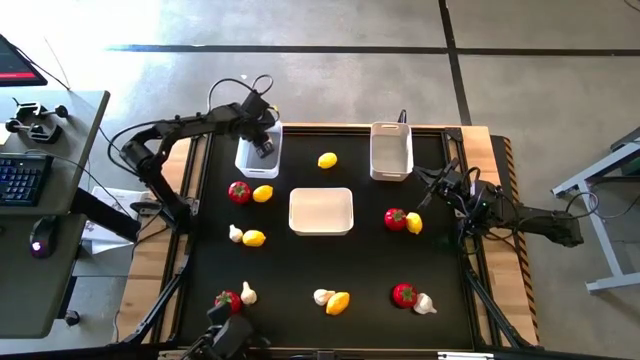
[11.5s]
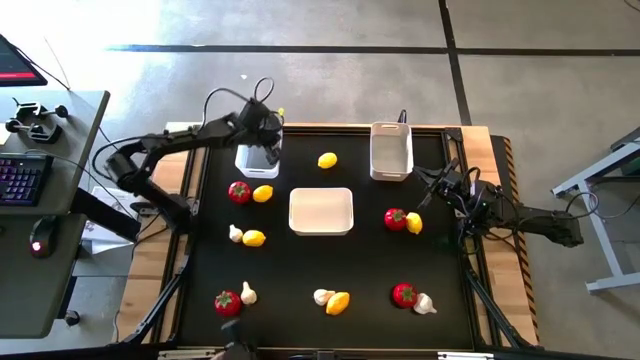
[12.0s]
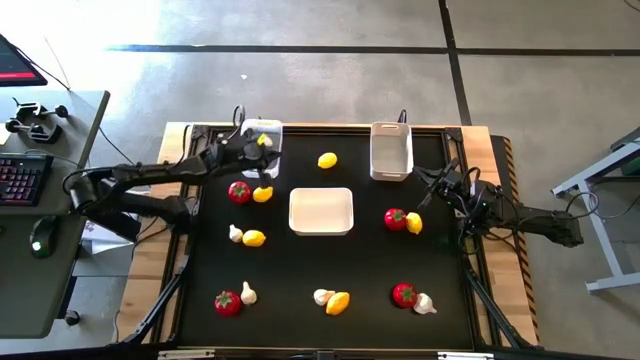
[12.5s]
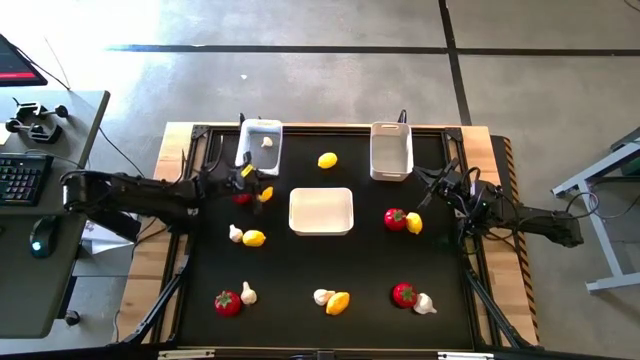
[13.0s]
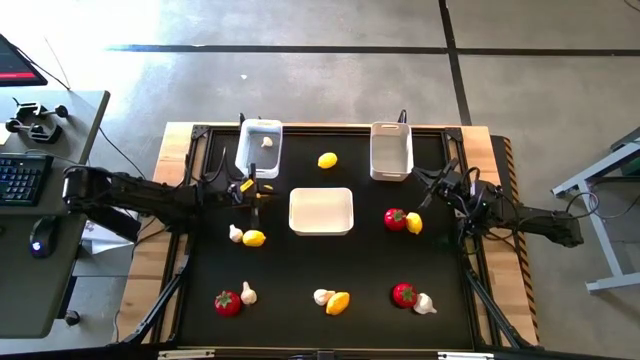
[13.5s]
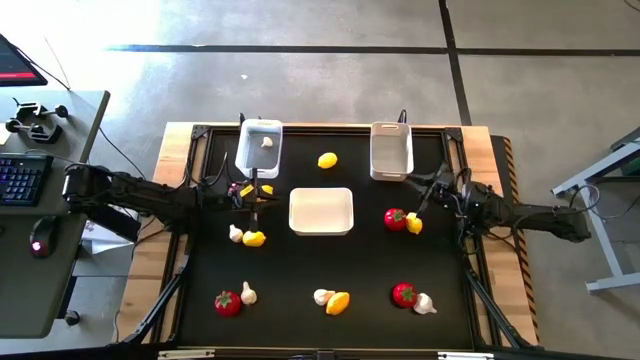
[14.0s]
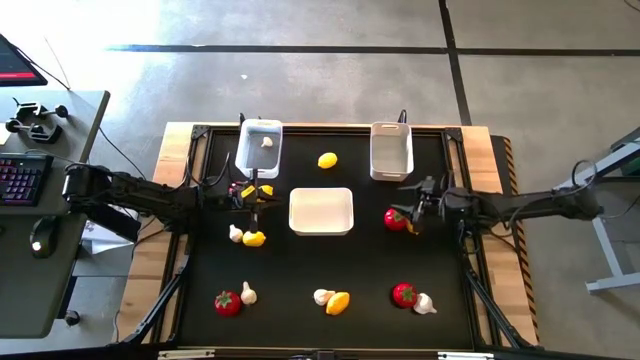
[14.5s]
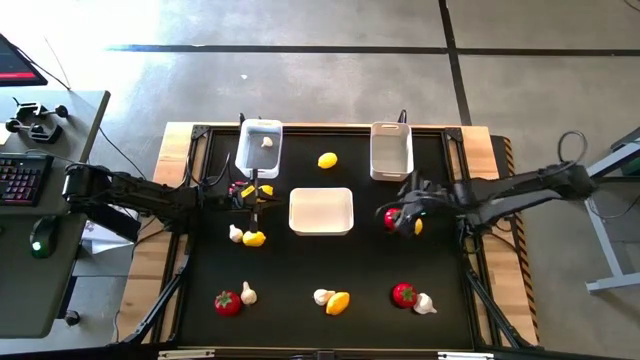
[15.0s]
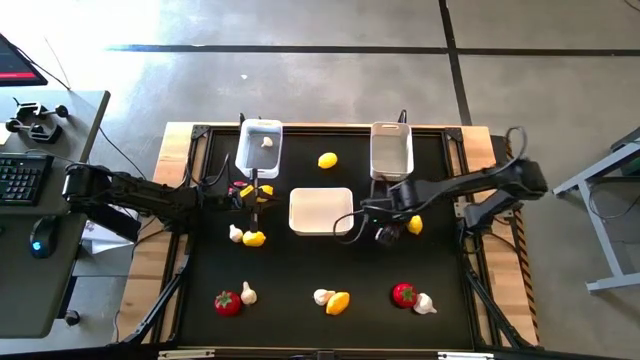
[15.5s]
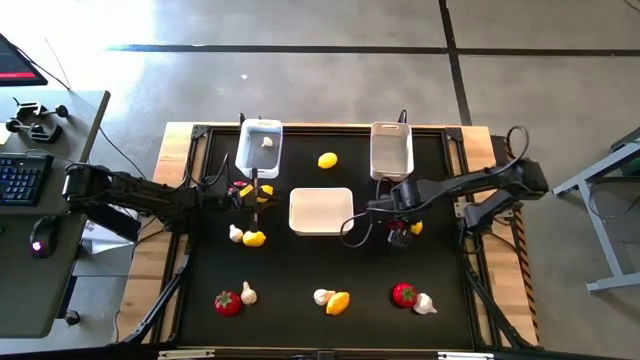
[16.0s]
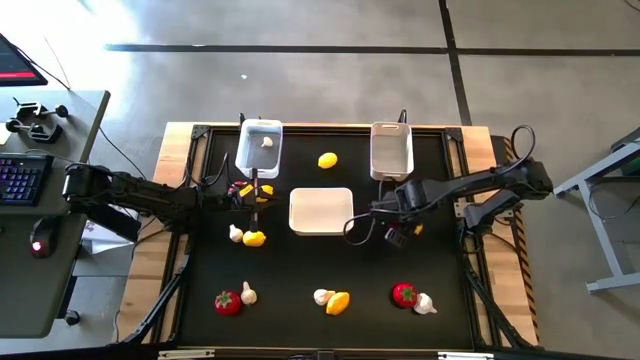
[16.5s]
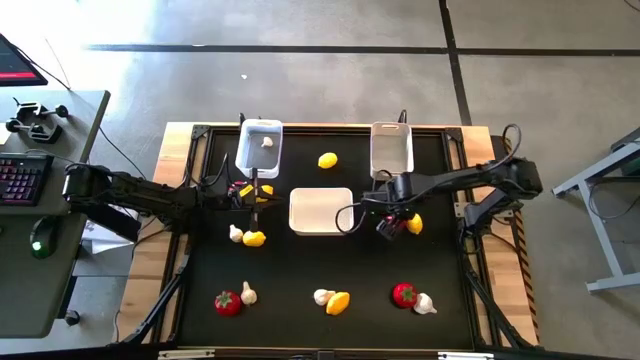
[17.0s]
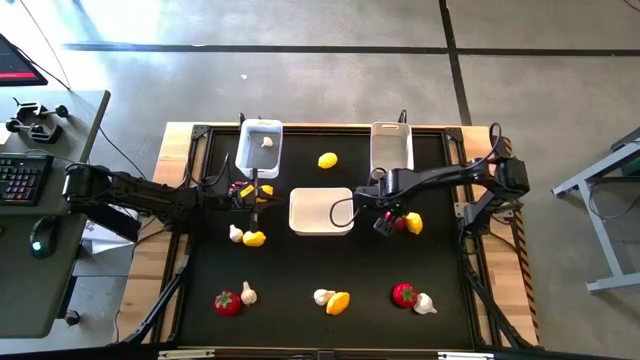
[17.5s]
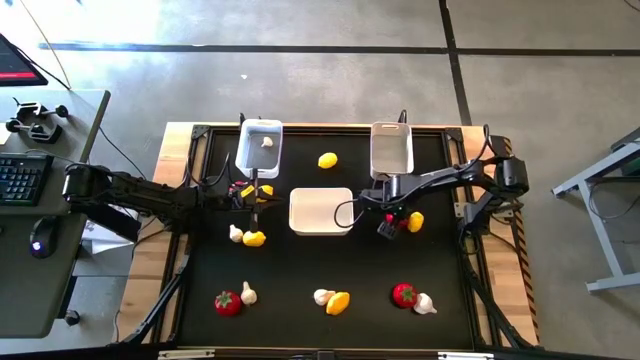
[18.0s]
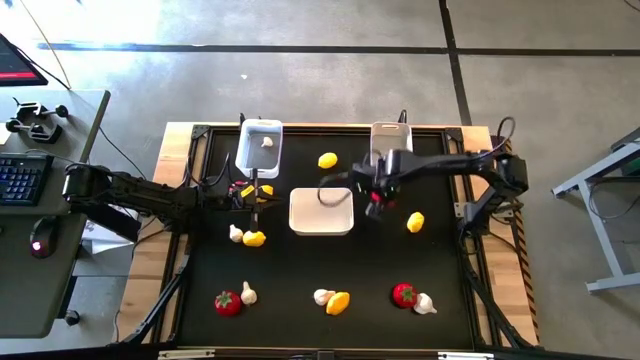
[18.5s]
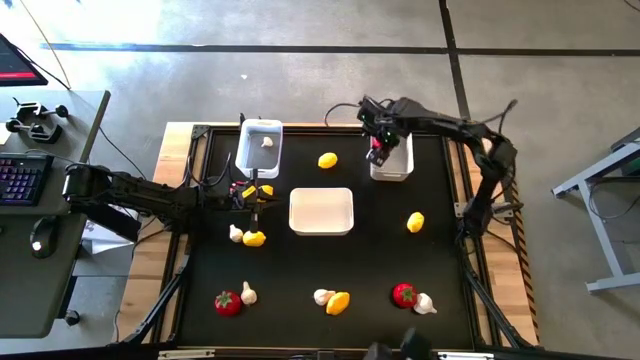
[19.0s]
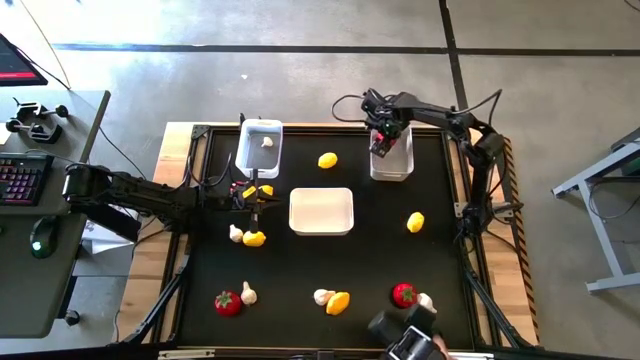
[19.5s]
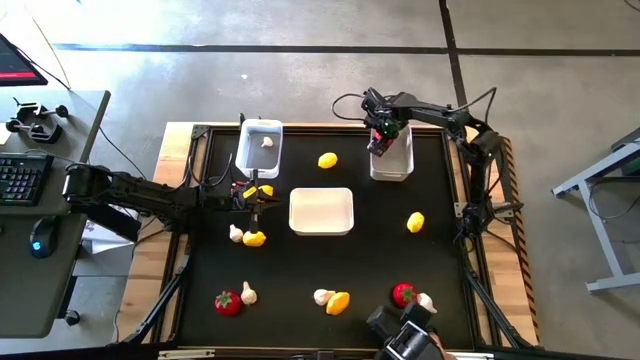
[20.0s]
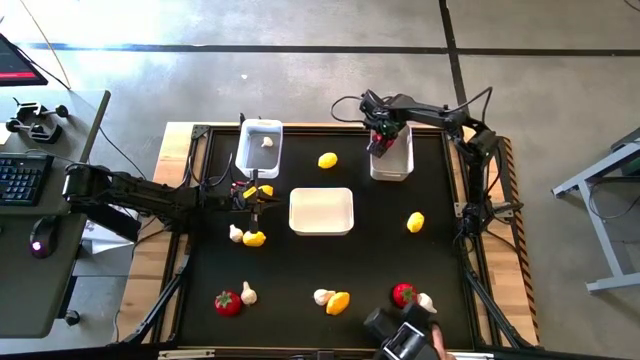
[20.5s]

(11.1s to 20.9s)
Task: Sort produce into baskets
Put the red tomato into the gray bin

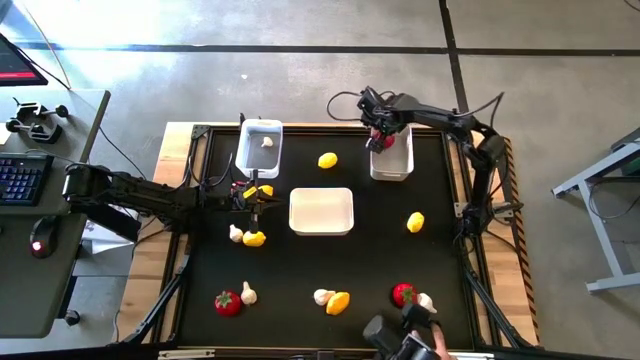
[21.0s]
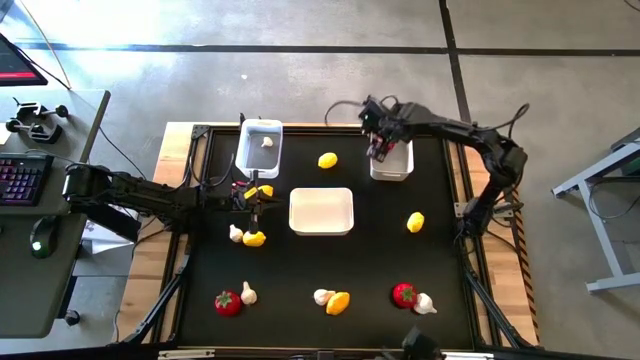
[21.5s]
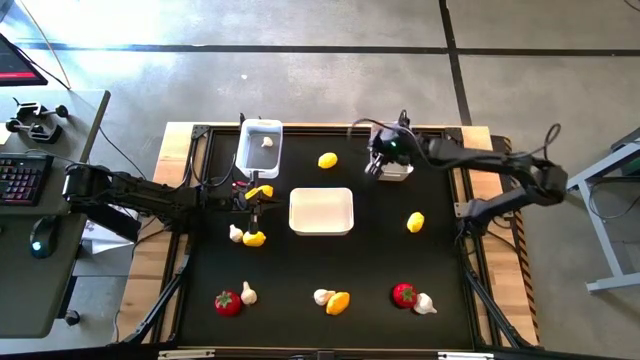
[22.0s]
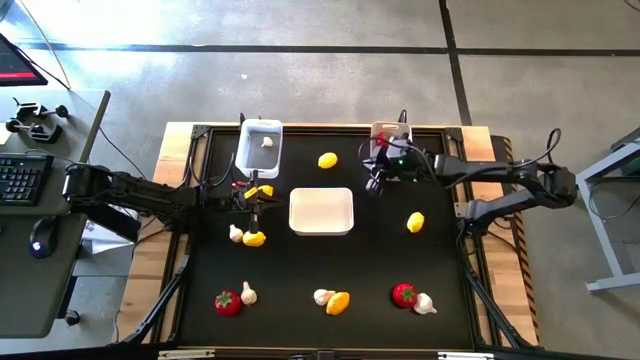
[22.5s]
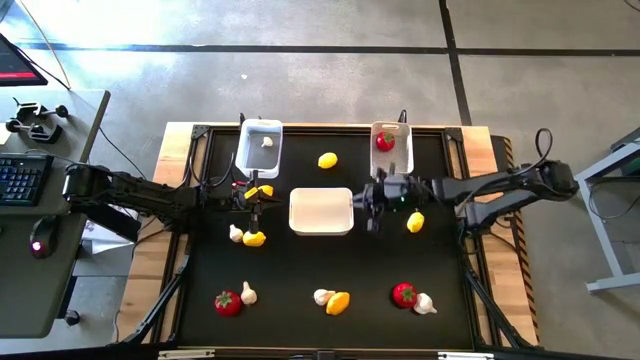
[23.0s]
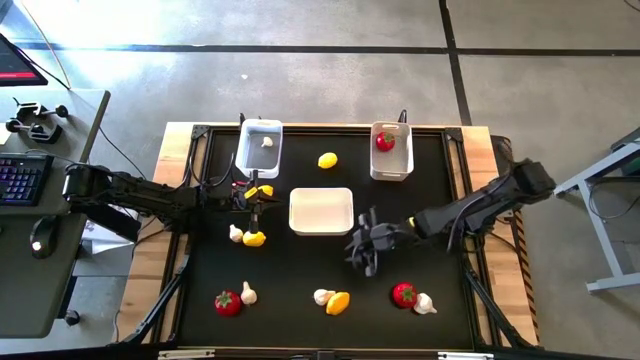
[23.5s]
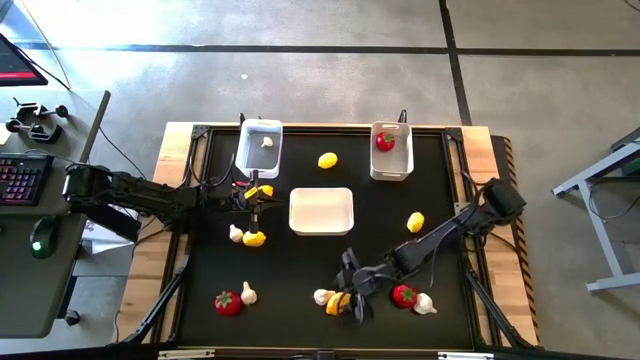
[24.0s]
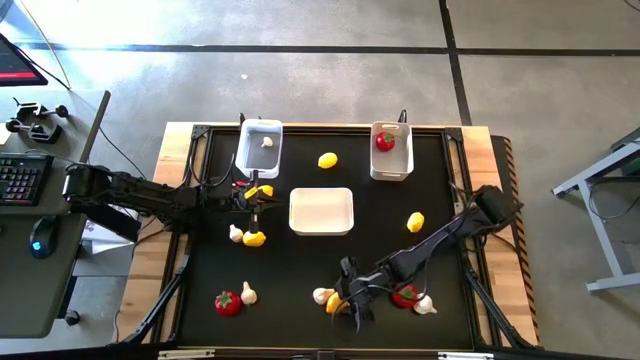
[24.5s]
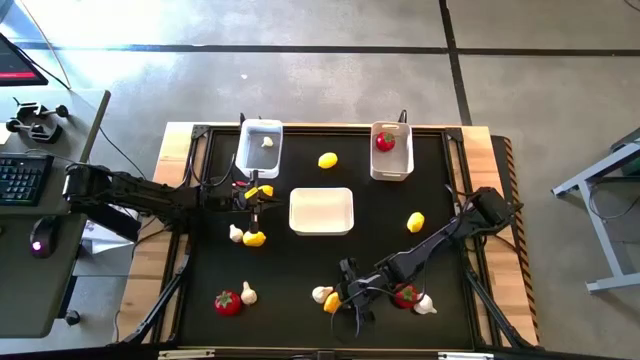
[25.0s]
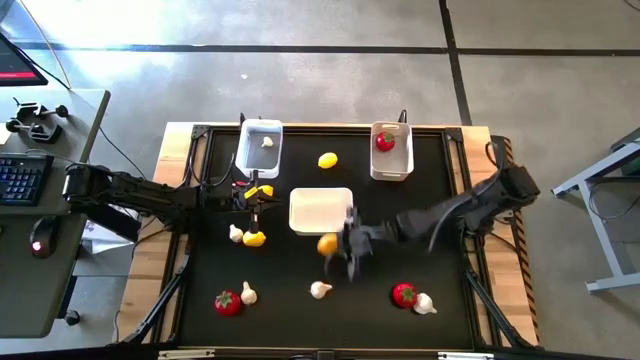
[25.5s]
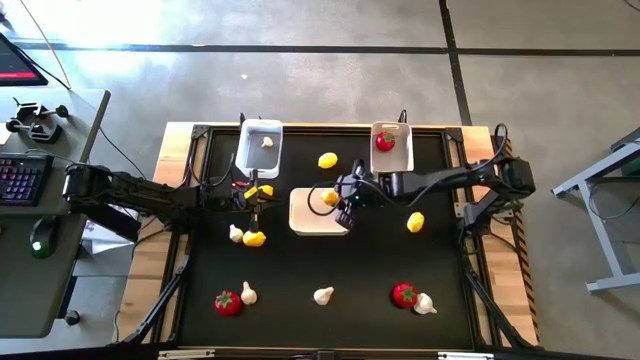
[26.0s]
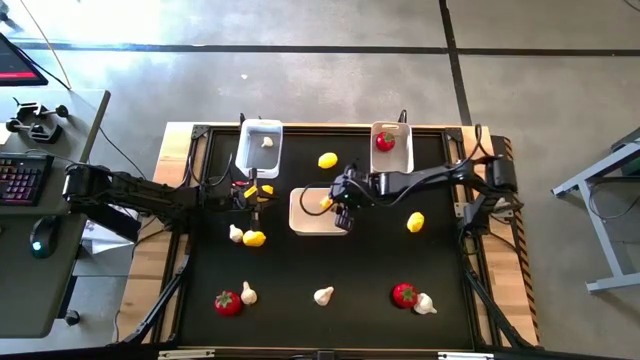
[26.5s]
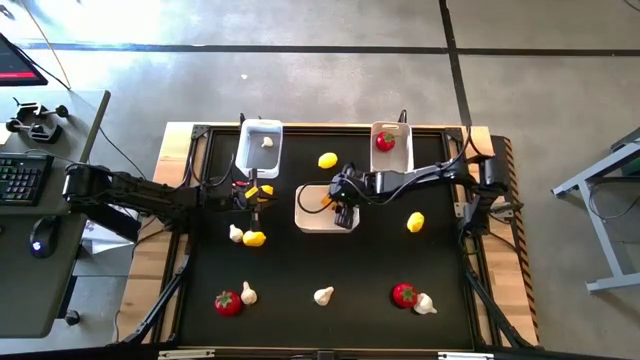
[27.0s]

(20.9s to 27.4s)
Put the yellow lemon into the white bin

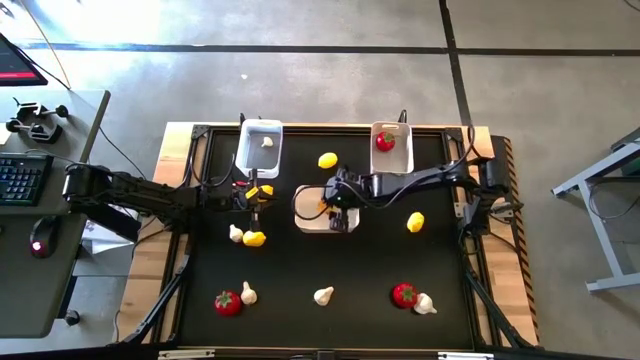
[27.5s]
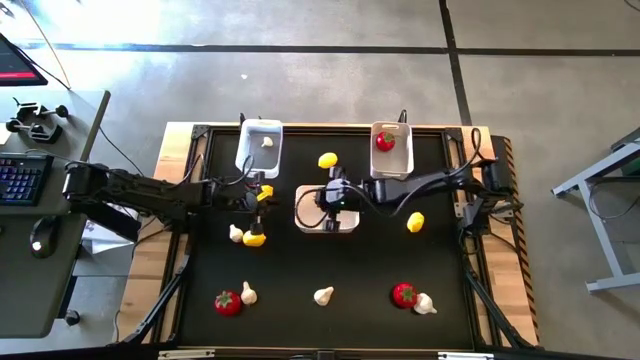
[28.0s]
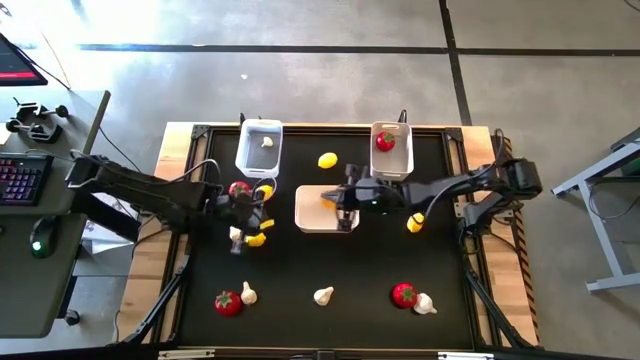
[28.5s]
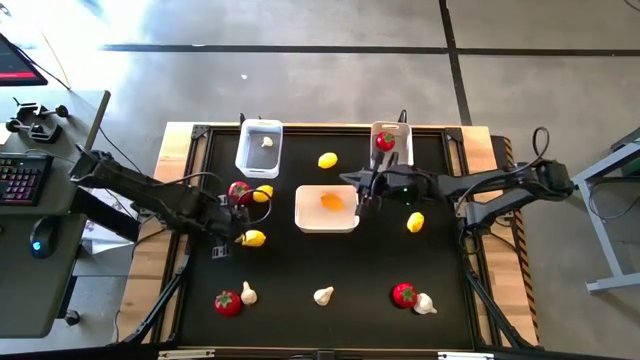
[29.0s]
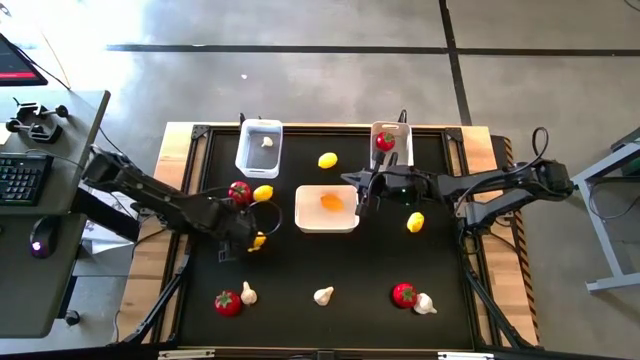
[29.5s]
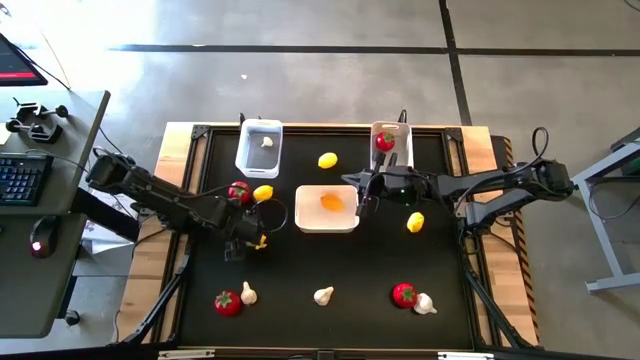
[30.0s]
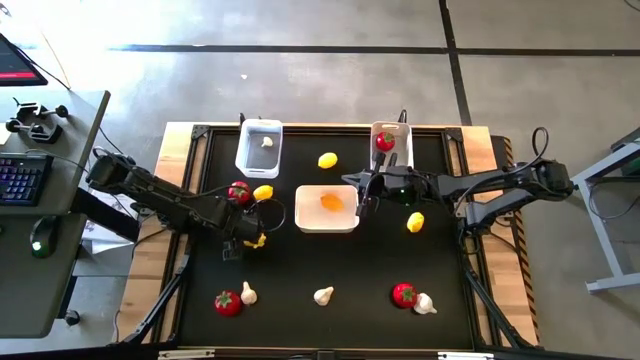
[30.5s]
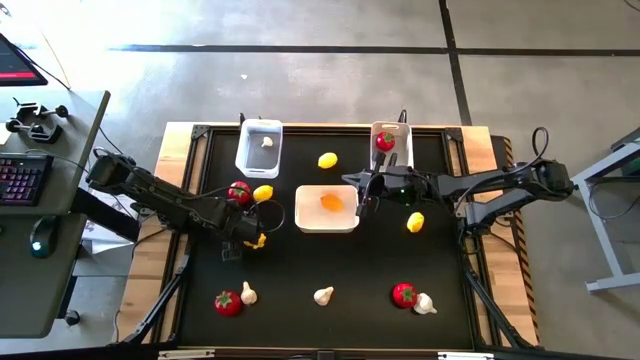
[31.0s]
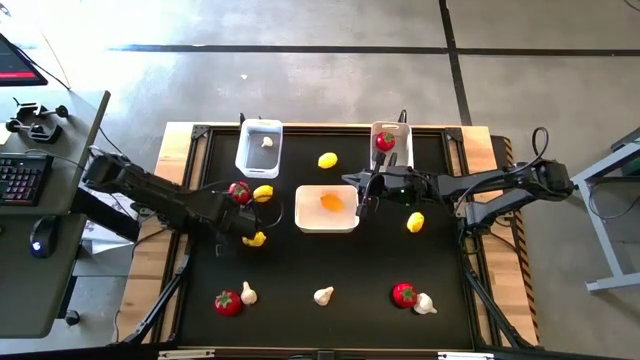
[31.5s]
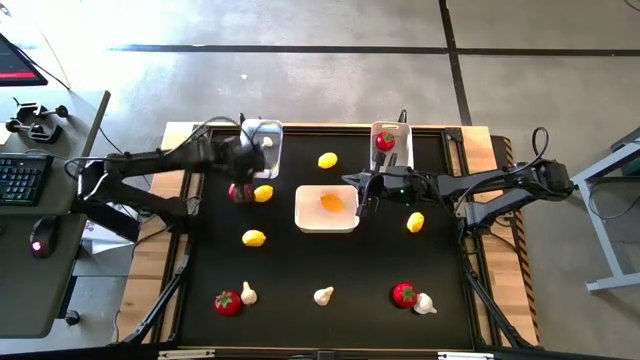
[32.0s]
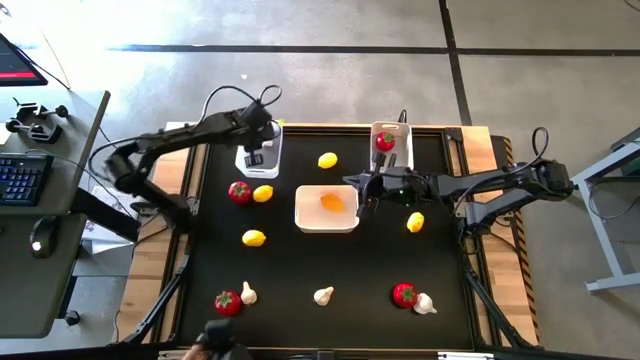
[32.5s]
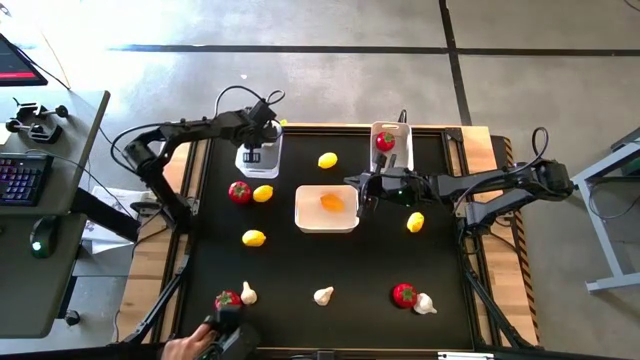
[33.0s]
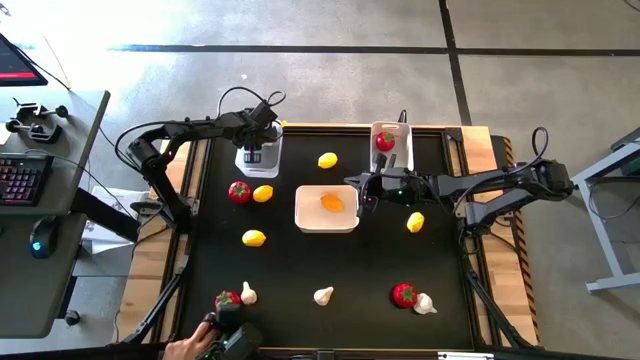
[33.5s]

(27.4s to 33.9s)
Put the white garlic into the transparent bin
